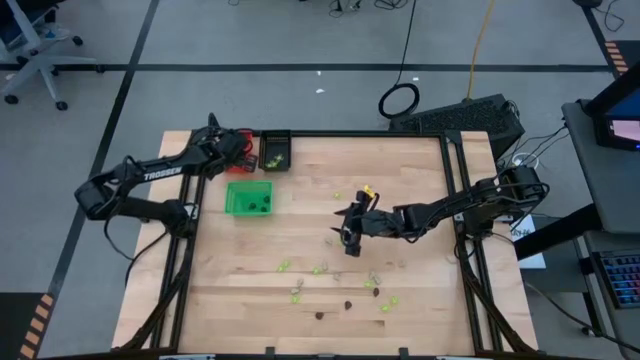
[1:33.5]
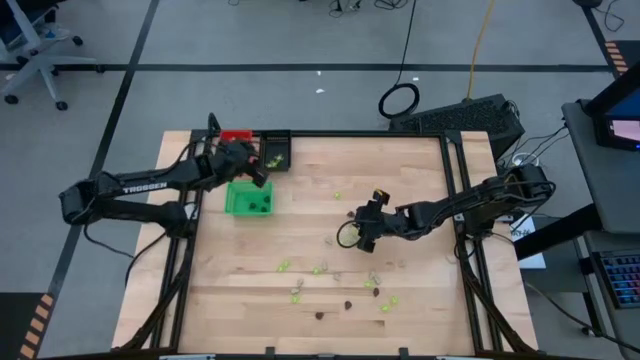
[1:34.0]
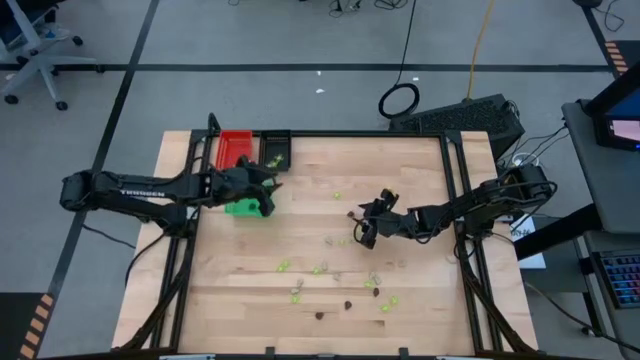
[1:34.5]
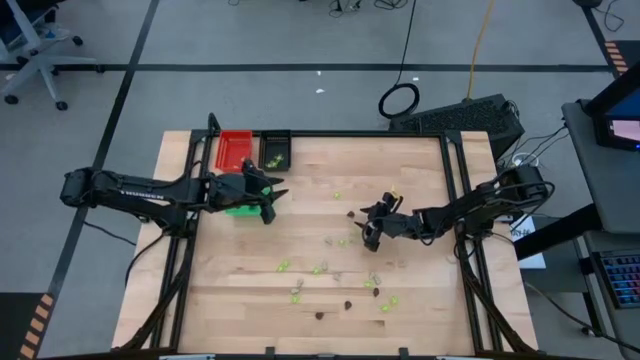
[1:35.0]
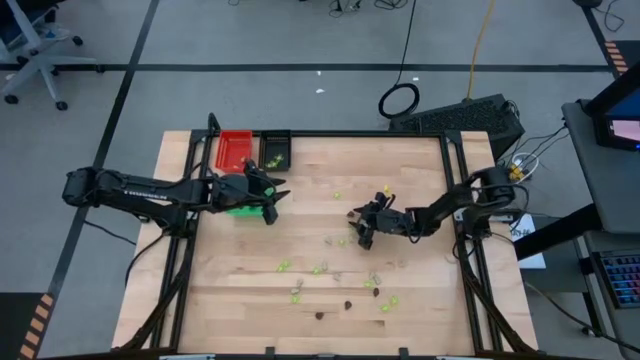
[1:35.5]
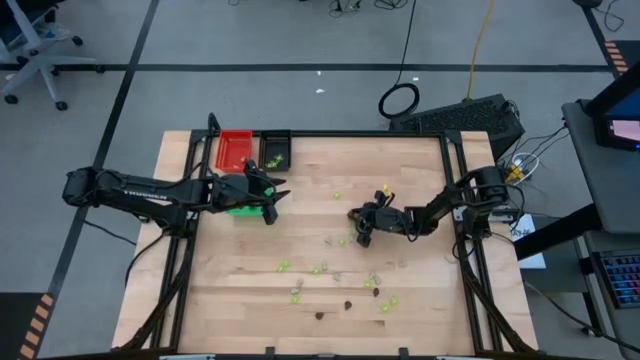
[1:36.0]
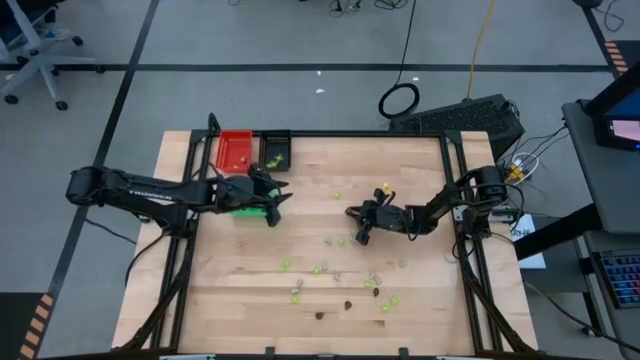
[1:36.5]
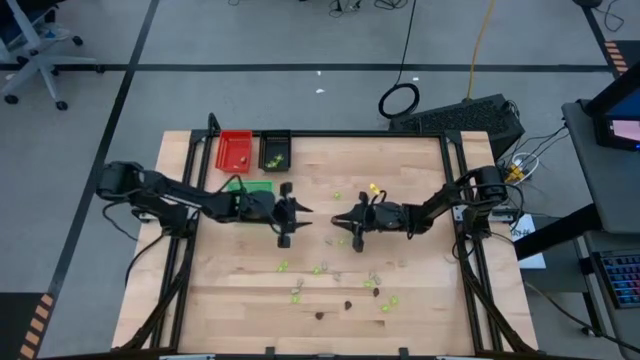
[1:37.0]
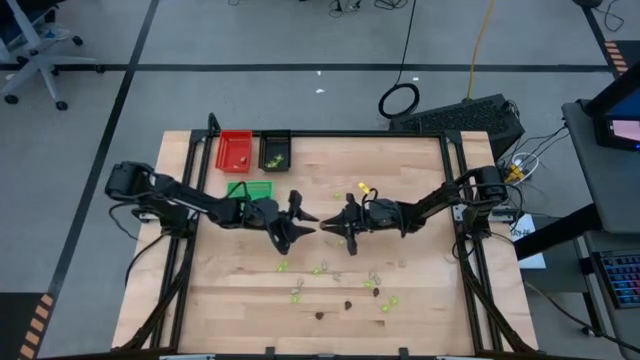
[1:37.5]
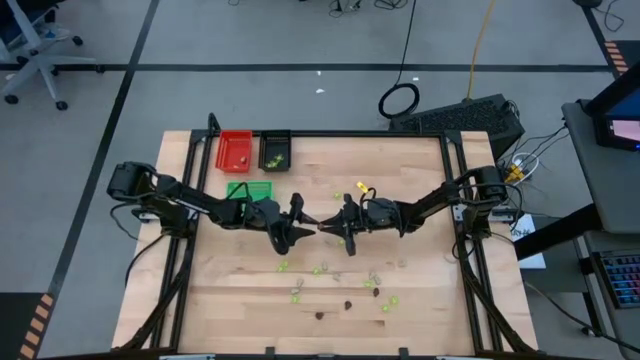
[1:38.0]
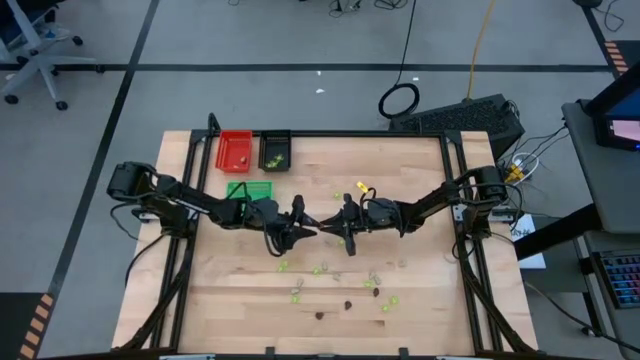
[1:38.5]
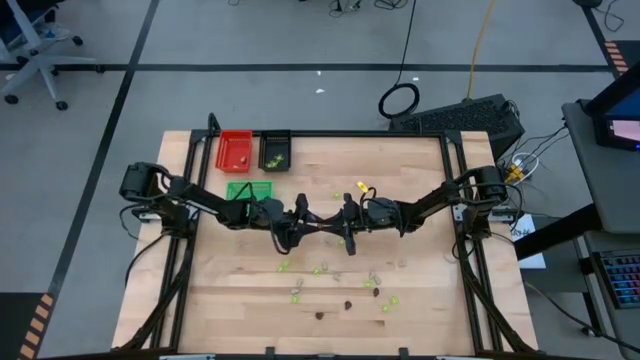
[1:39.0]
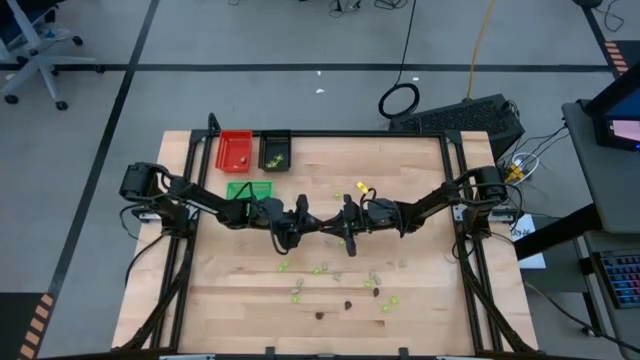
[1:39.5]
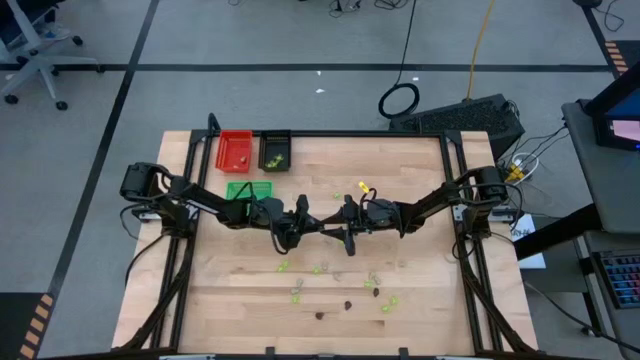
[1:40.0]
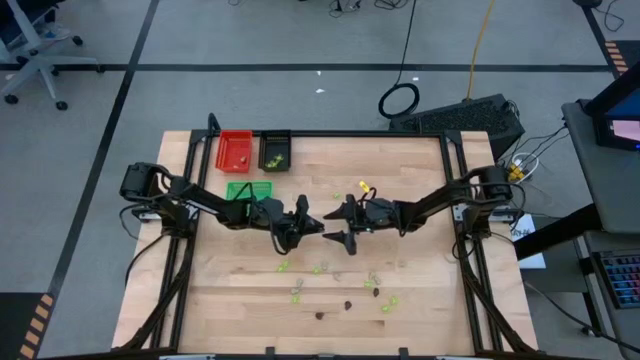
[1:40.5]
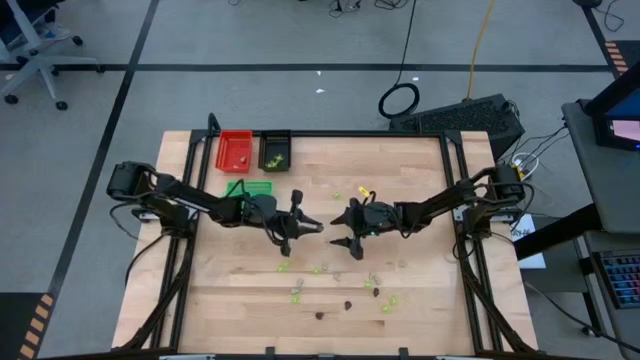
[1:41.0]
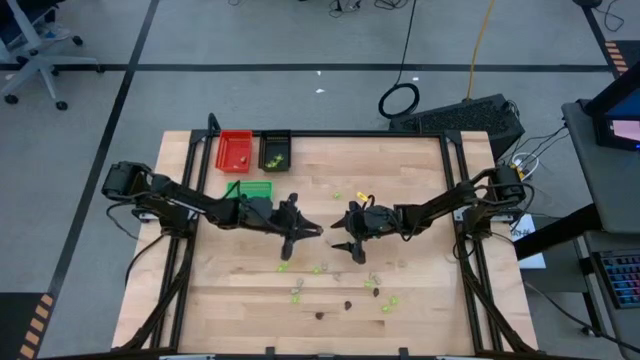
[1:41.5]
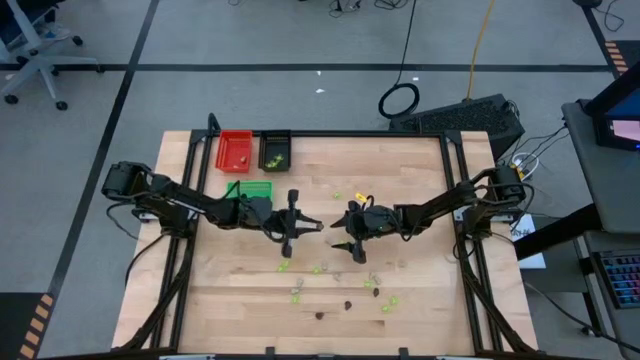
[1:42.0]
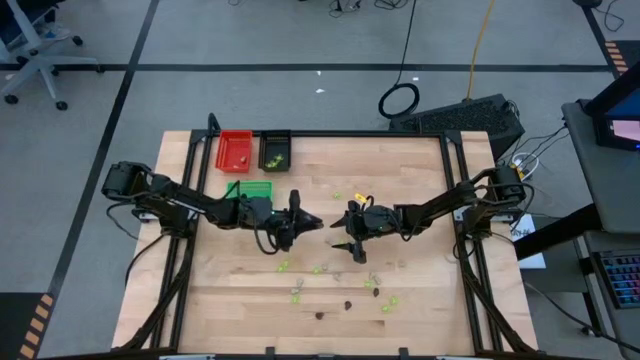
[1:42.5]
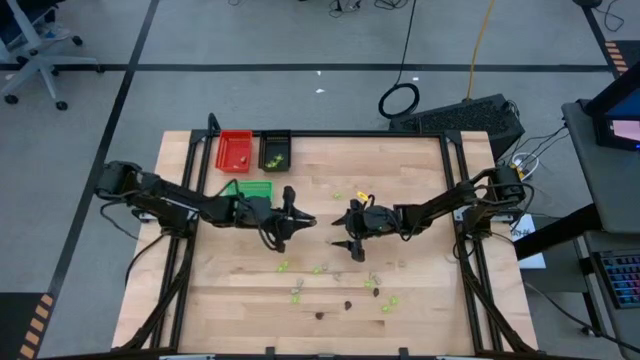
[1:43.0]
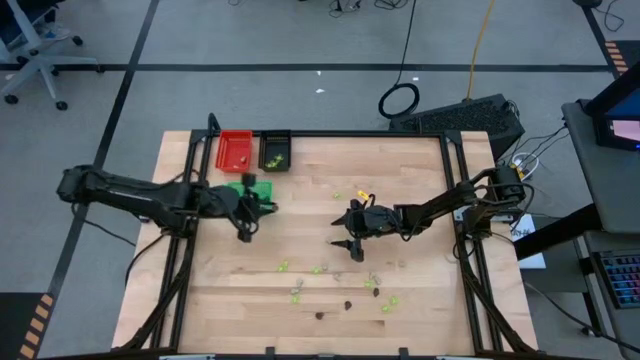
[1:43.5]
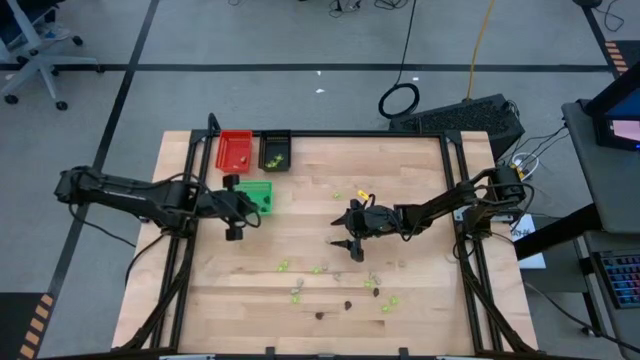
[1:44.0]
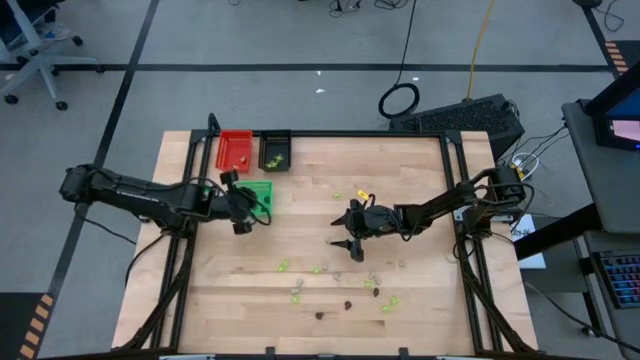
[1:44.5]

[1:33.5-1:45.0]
Task: Sort Halloween decoration
Put the black skull toy into the green bin

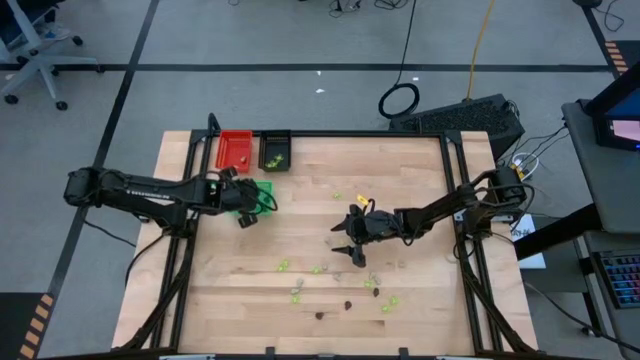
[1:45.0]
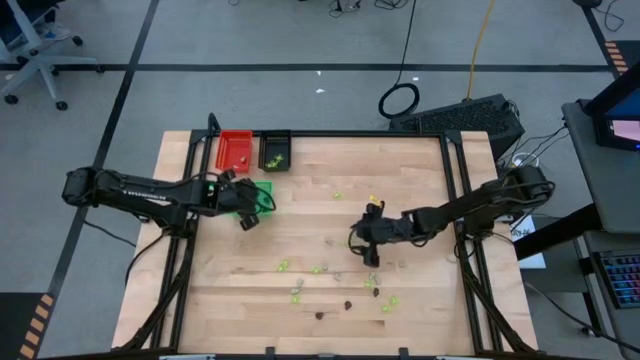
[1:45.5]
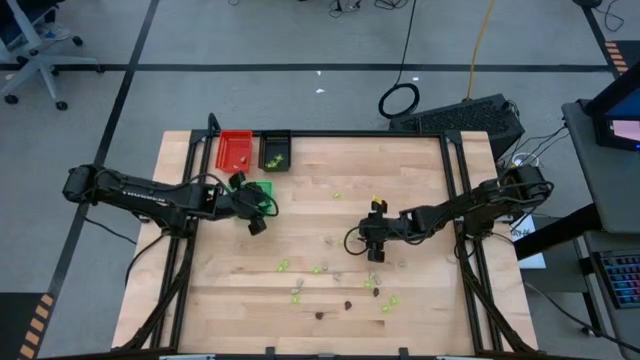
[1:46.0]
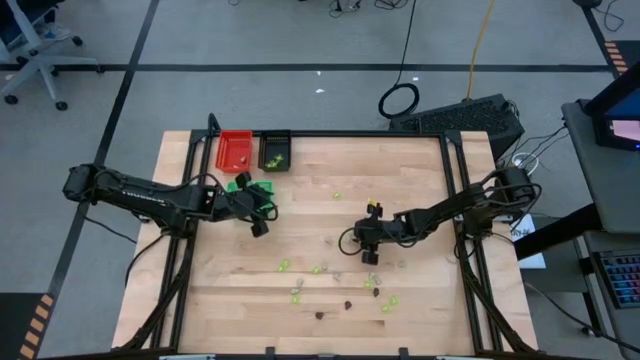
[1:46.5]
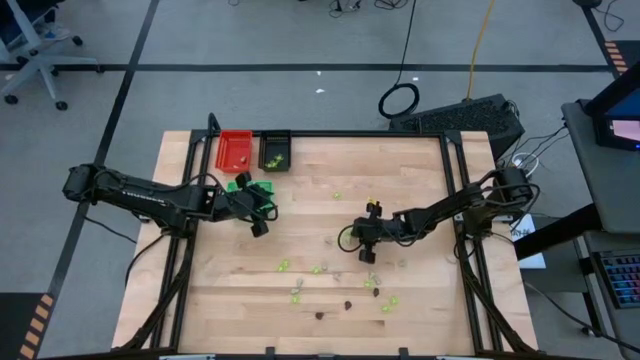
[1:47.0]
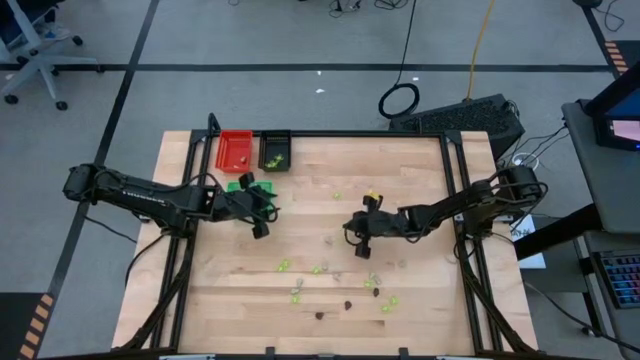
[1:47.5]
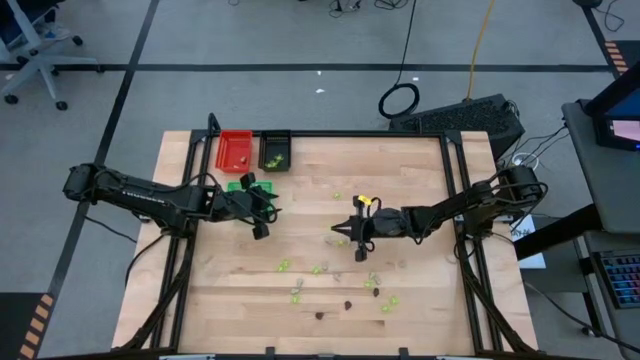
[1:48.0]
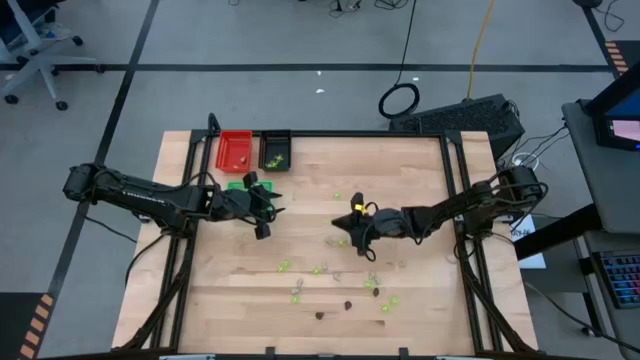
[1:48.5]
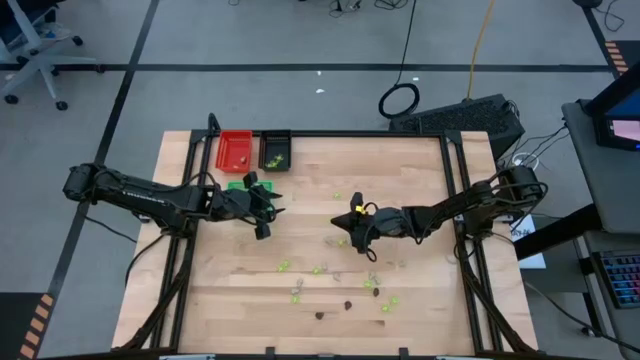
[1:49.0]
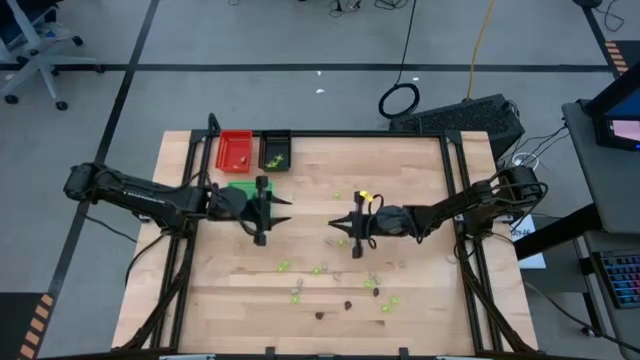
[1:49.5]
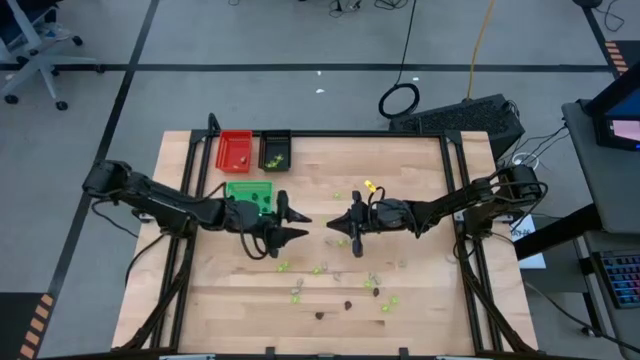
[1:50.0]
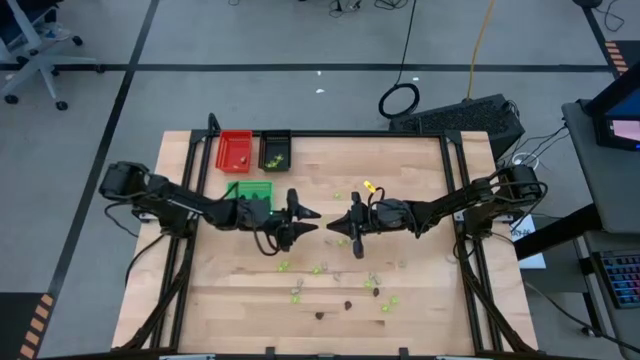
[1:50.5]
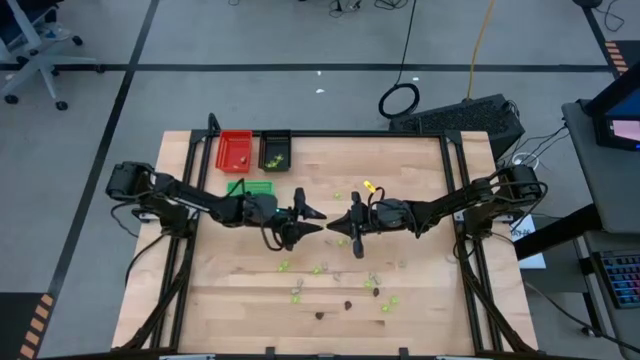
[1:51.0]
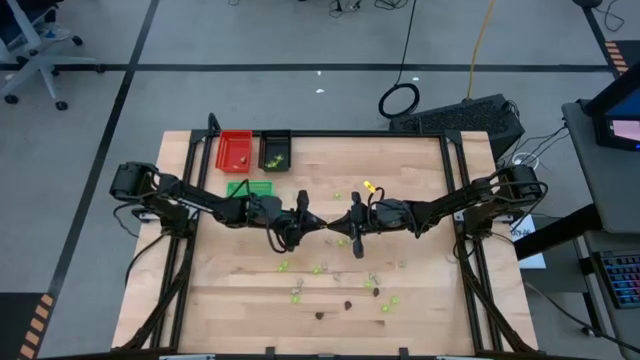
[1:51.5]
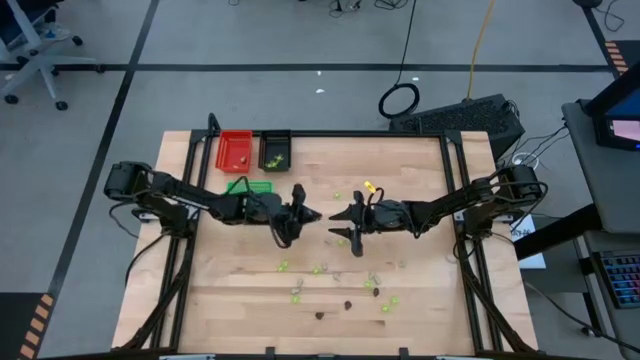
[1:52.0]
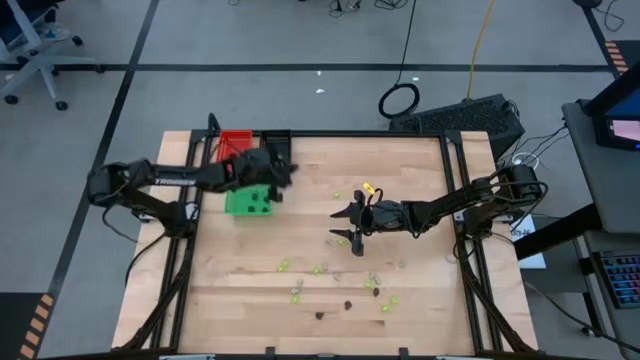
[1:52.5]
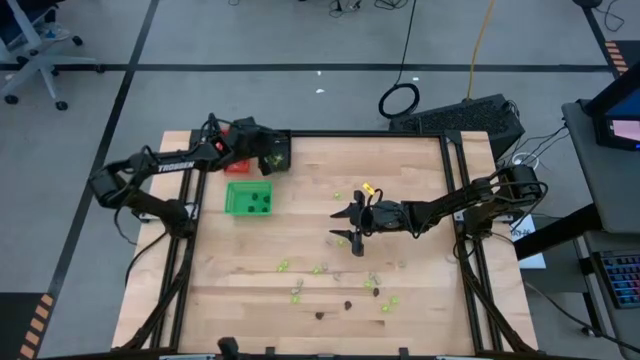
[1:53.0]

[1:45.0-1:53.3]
Put the green spider toy into the black bin

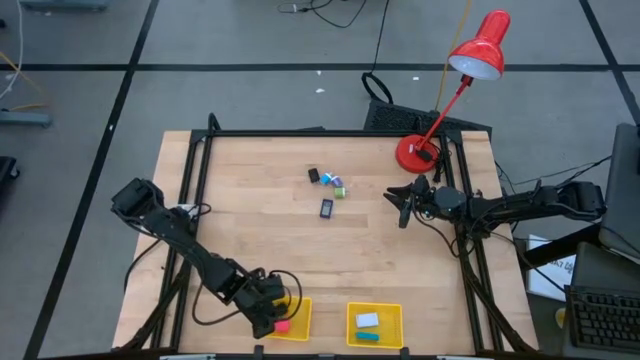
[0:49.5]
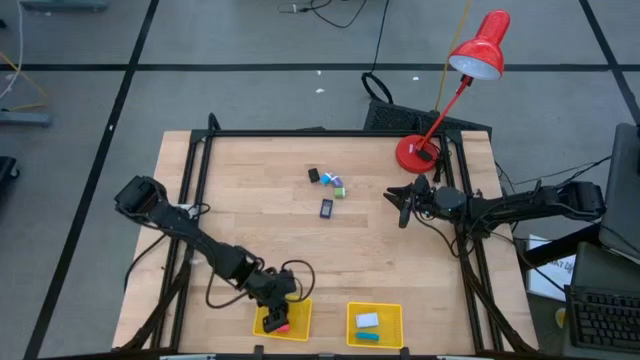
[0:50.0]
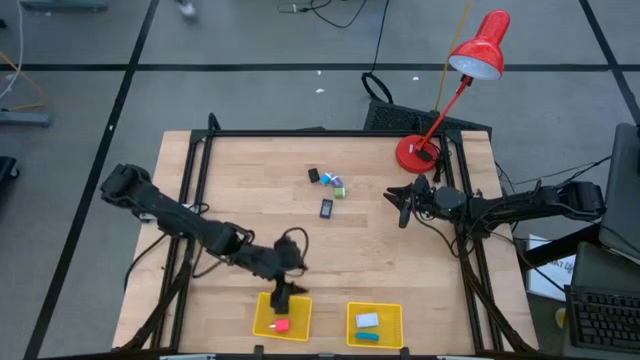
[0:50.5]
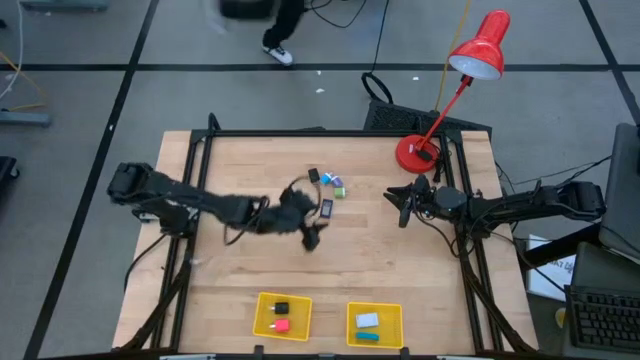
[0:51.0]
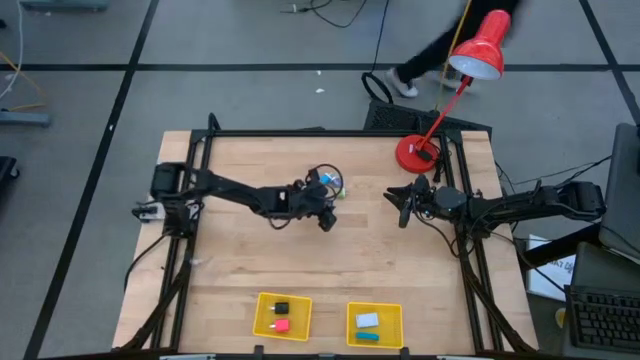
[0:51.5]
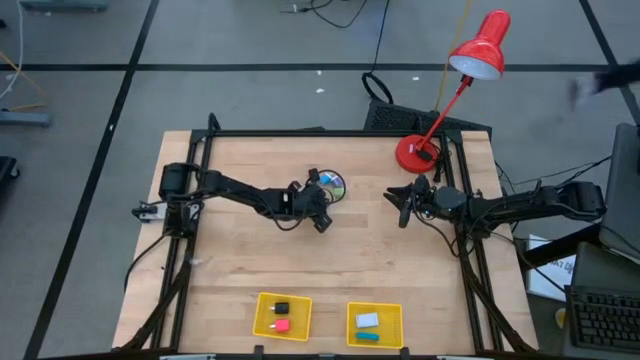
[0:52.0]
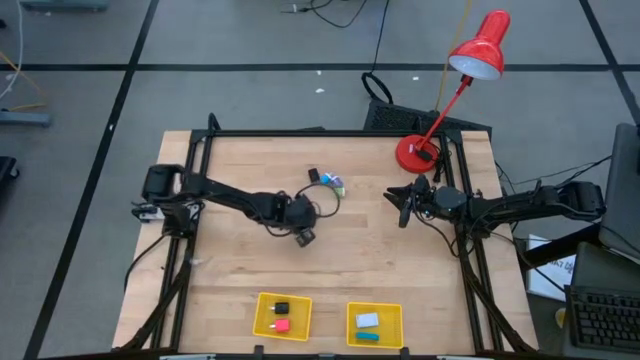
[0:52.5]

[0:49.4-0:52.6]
Task: Pick & Place Office items
Put the light blue digital clock into the right yellow bin
